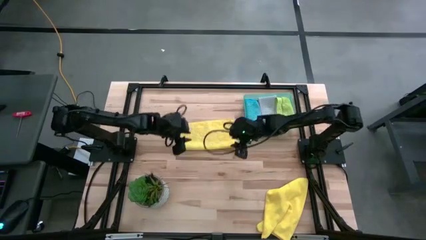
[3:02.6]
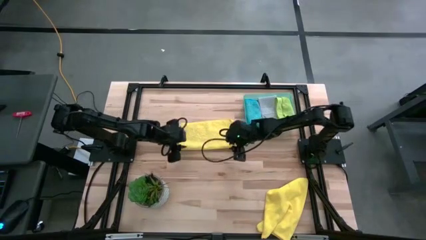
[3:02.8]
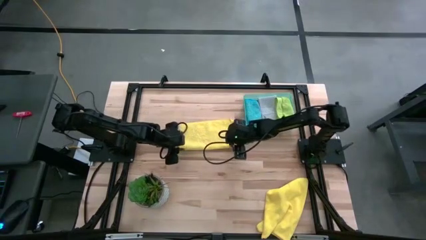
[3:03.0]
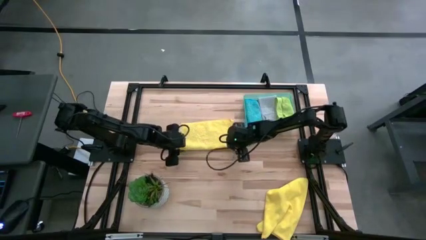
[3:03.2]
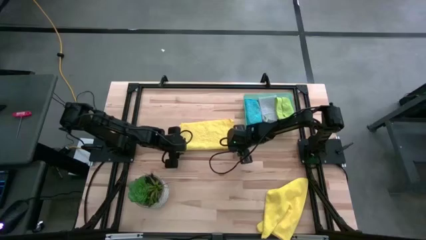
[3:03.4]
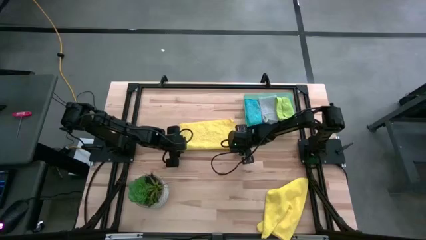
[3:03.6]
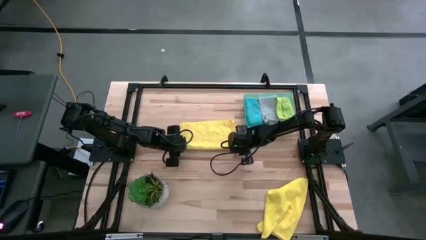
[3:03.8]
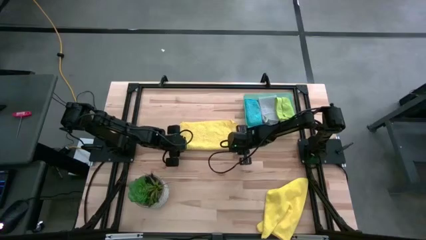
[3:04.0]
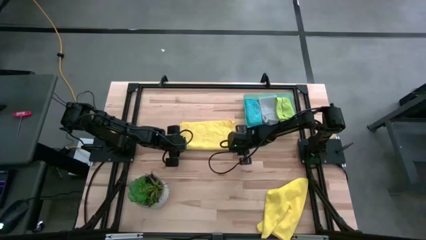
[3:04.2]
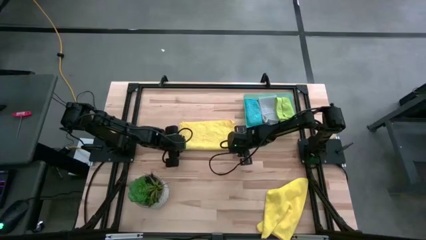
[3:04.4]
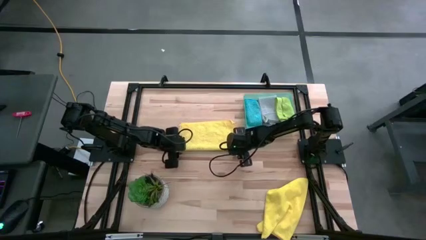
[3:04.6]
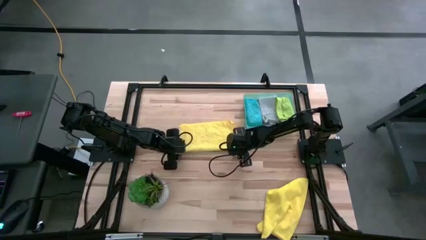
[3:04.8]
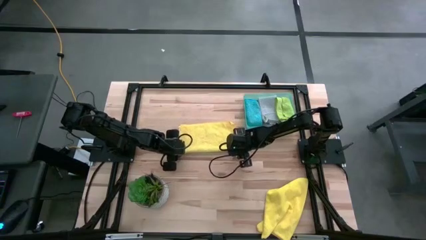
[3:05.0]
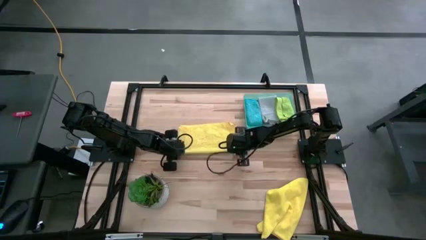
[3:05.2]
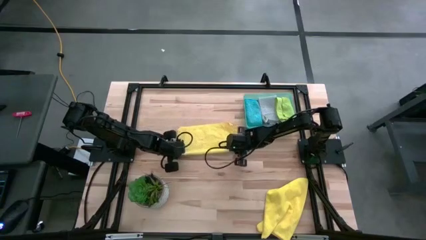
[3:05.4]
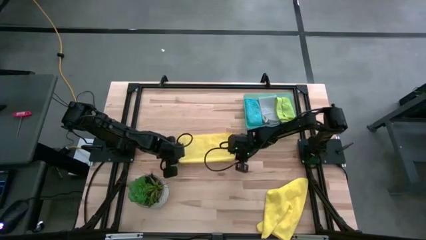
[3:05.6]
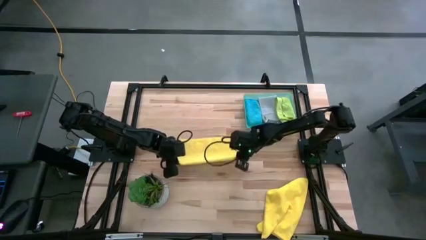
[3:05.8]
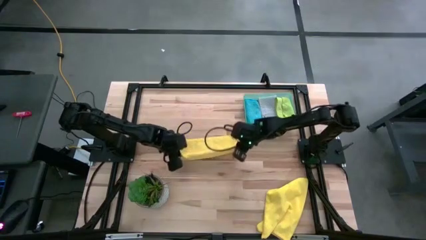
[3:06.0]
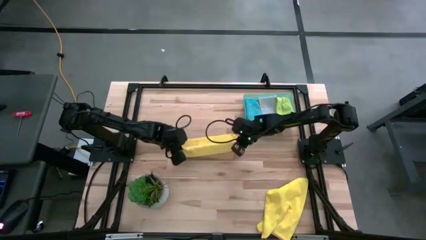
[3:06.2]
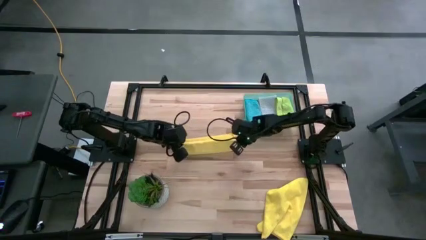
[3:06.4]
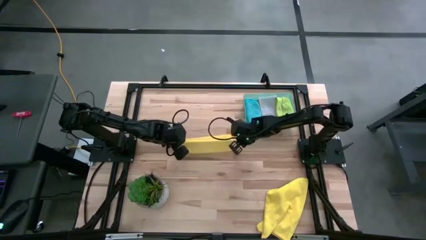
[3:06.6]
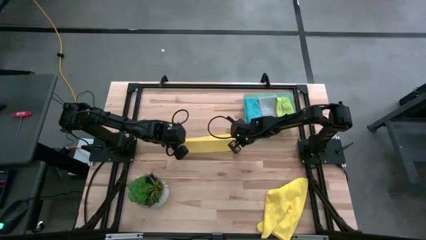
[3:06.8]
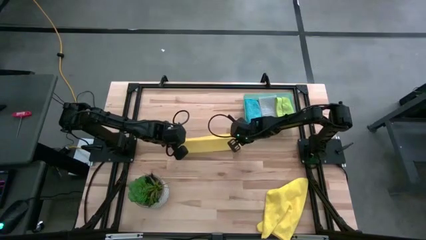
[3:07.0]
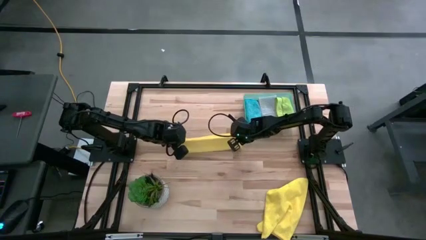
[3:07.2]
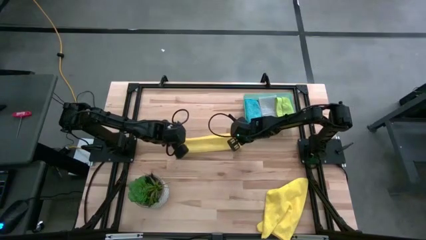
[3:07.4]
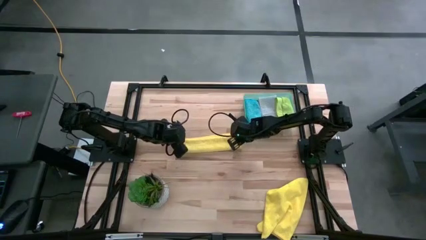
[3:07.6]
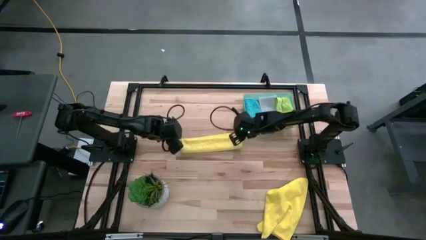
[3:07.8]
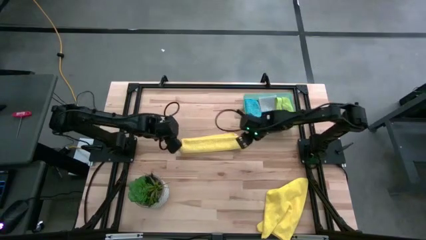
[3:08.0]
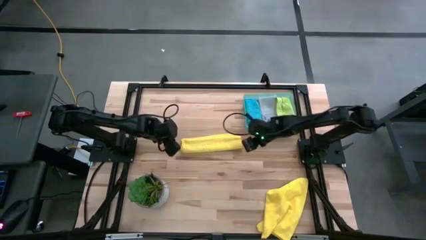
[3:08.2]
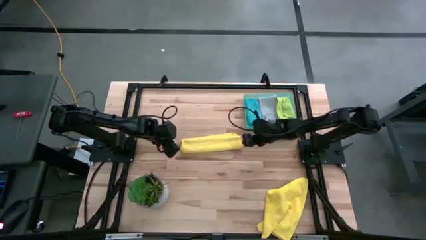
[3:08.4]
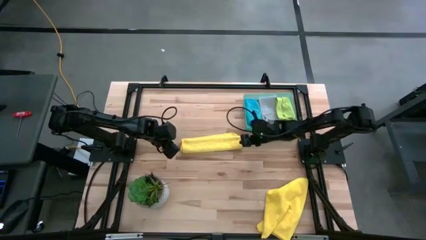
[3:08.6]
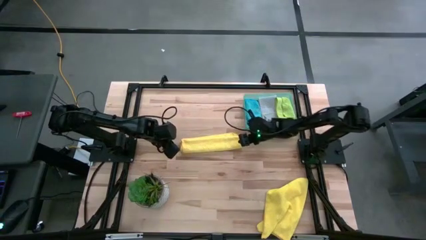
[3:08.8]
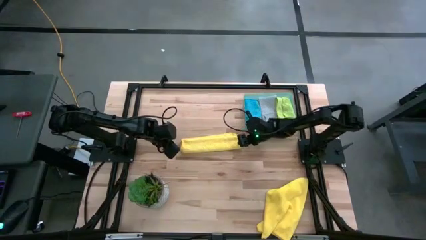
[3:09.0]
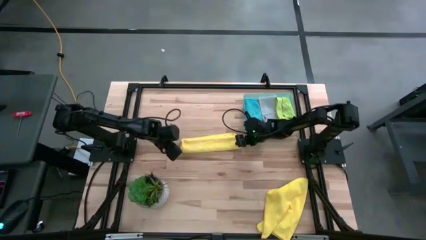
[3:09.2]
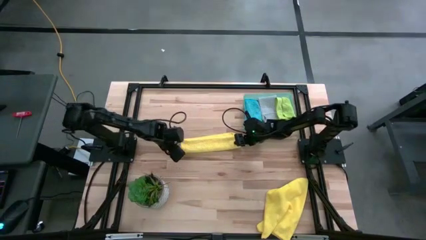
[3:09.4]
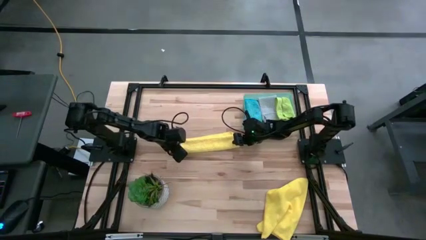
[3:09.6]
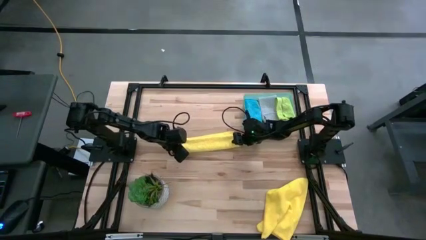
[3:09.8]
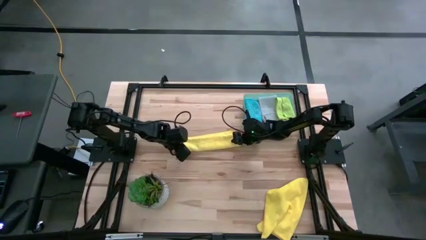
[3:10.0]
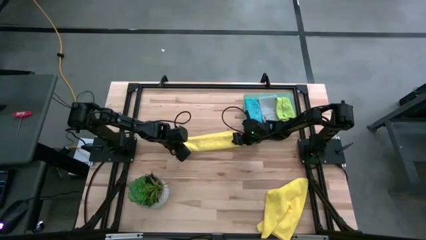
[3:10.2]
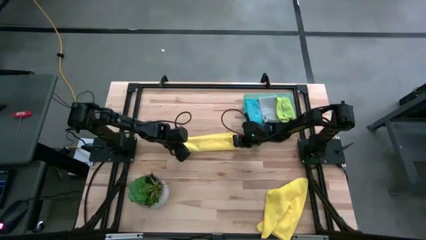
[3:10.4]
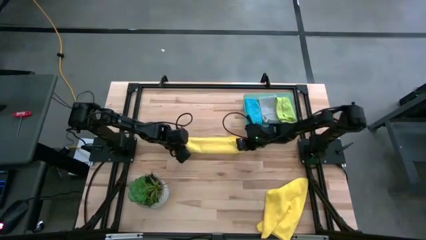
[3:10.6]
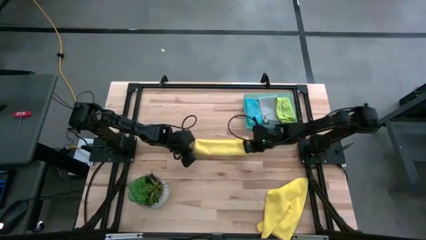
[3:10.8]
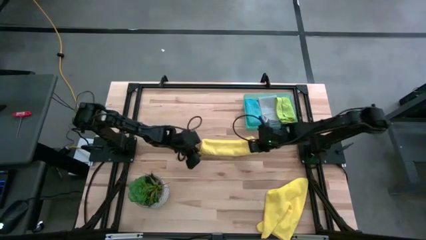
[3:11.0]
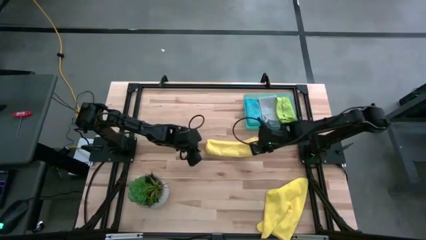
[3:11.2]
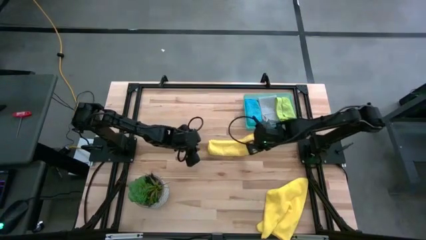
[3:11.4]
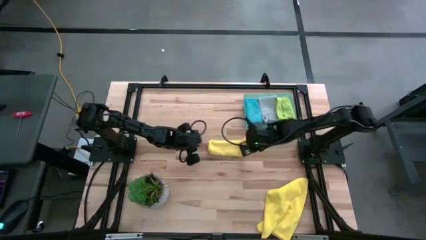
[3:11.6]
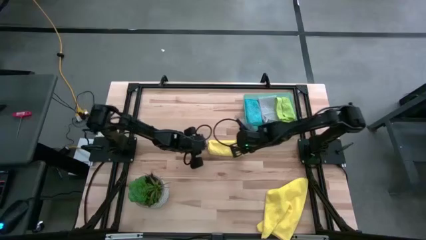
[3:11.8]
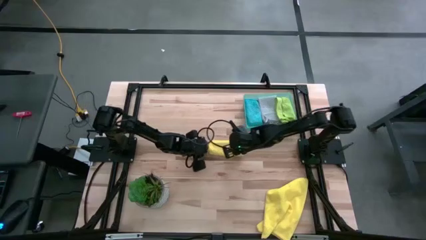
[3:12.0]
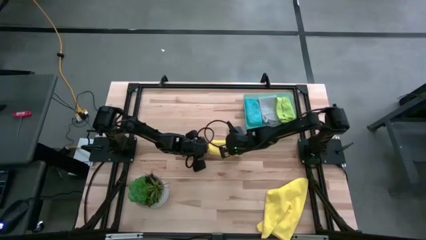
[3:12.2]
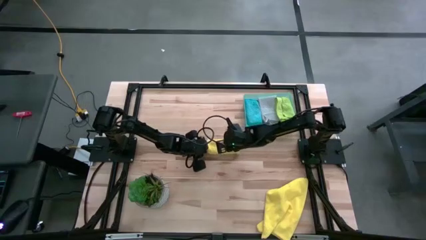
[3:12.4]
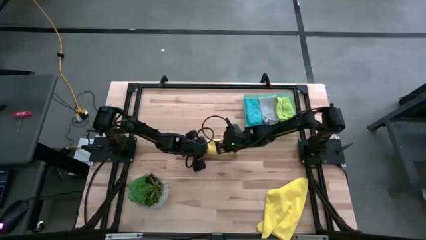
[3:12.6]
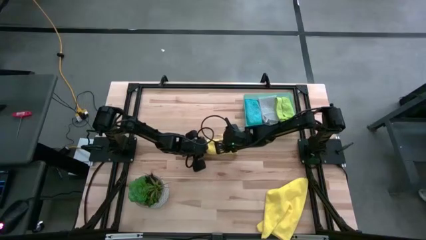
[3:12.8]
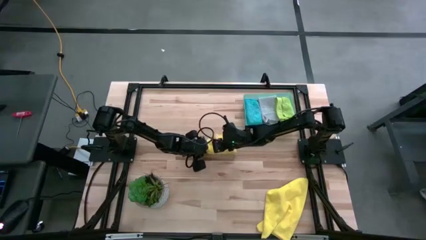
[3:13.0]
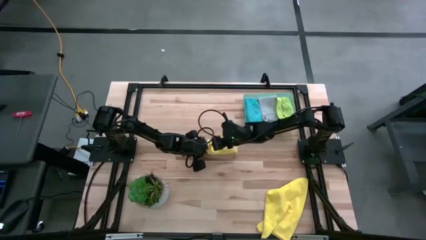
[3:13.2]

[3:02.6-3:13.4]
Task: Fold microfiber towels
Fold the left yellow towel

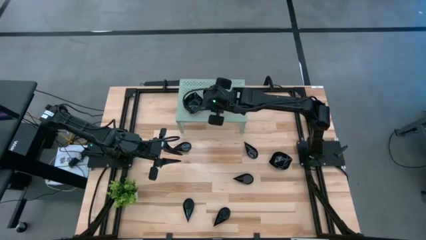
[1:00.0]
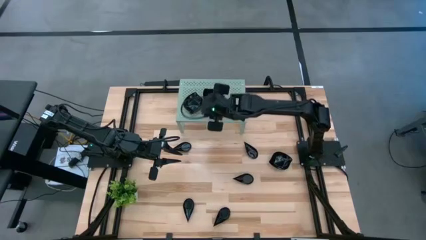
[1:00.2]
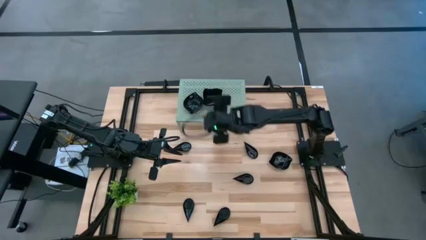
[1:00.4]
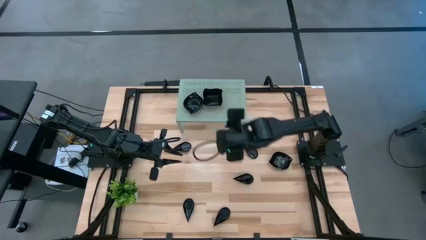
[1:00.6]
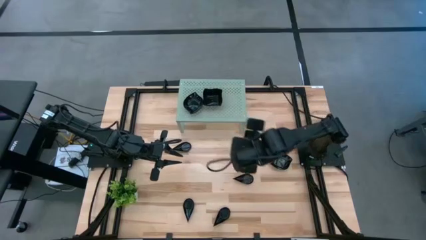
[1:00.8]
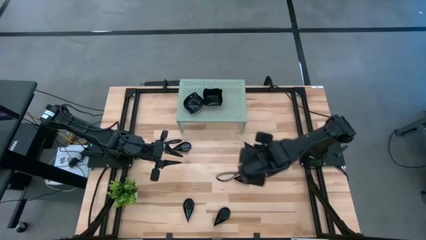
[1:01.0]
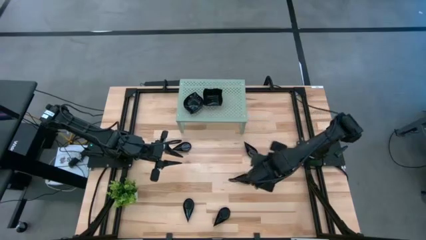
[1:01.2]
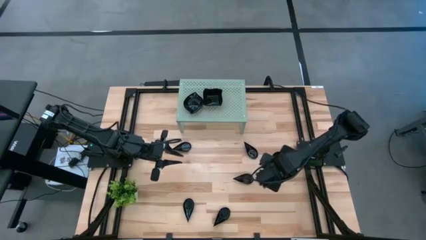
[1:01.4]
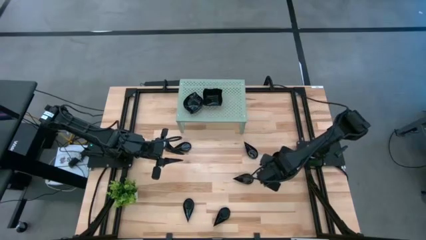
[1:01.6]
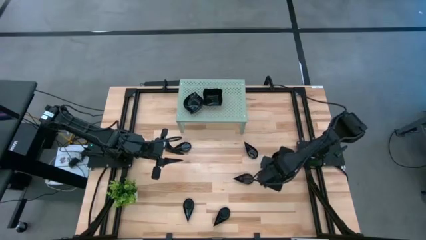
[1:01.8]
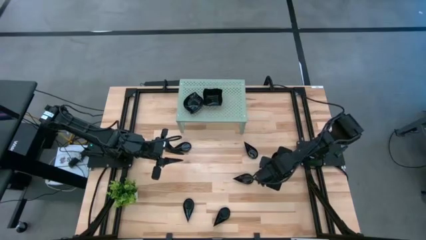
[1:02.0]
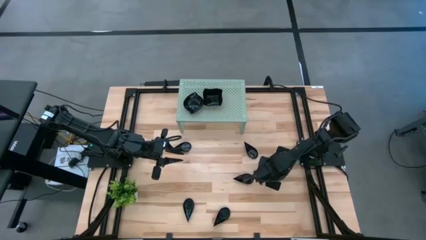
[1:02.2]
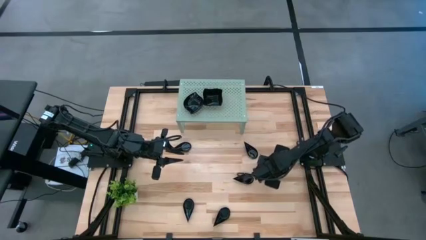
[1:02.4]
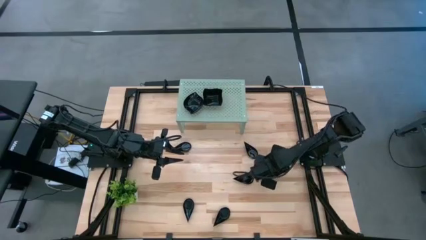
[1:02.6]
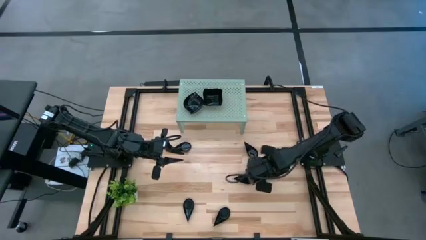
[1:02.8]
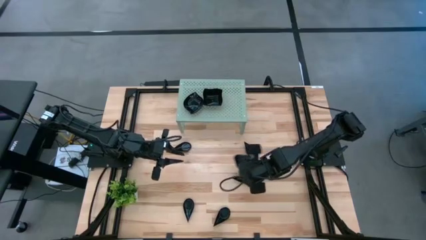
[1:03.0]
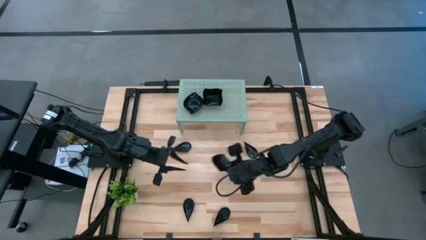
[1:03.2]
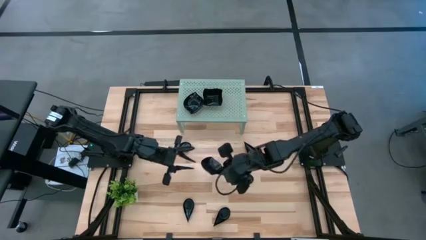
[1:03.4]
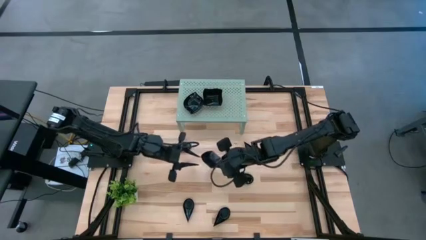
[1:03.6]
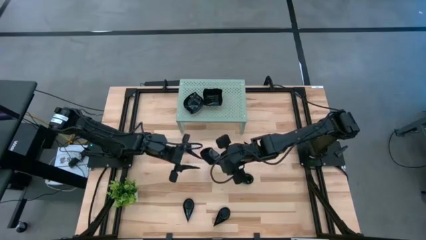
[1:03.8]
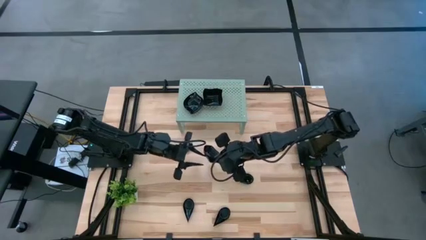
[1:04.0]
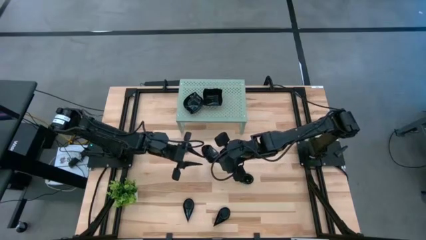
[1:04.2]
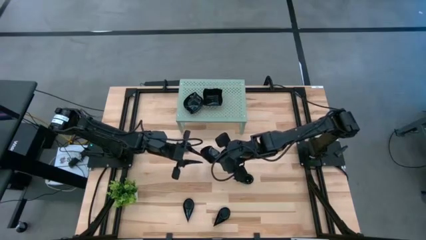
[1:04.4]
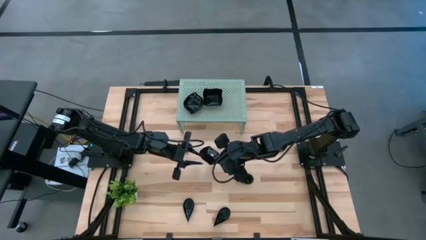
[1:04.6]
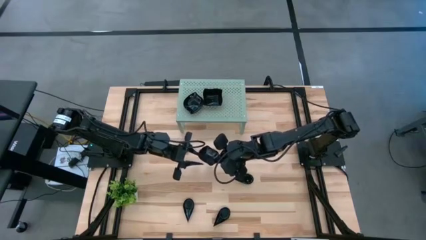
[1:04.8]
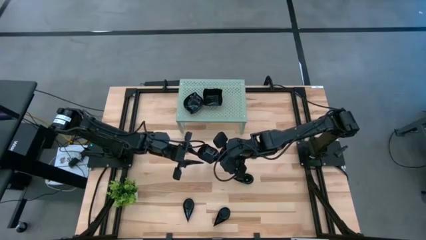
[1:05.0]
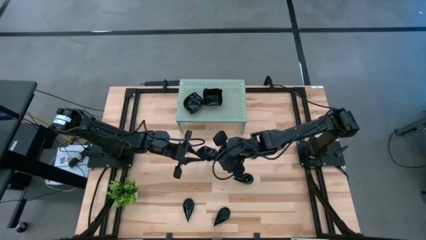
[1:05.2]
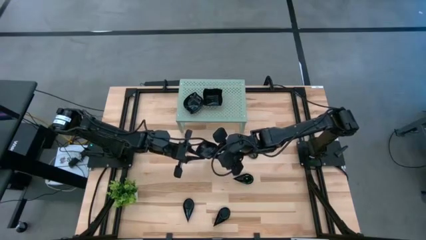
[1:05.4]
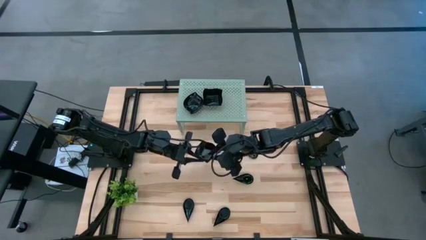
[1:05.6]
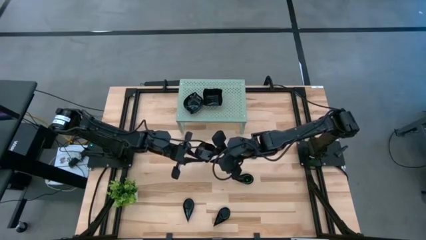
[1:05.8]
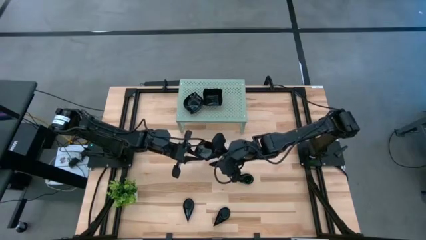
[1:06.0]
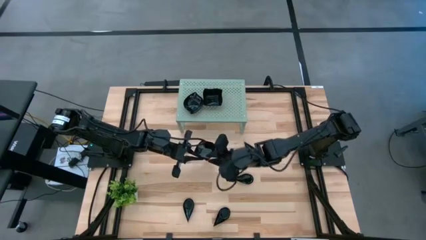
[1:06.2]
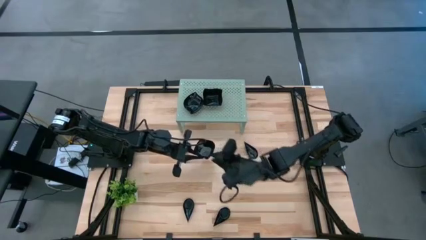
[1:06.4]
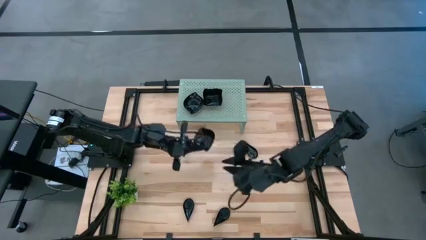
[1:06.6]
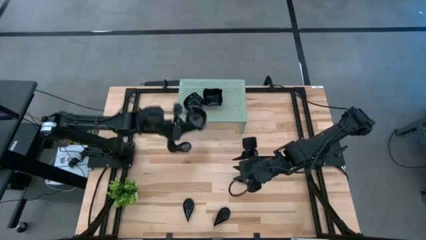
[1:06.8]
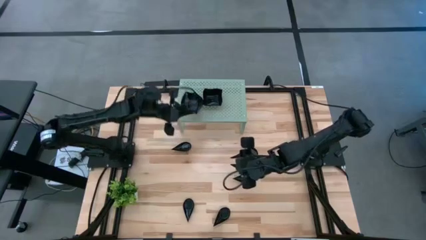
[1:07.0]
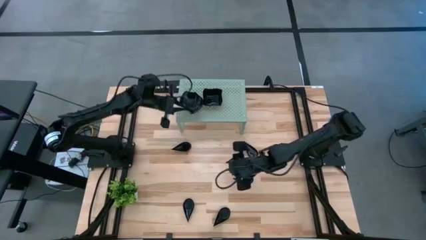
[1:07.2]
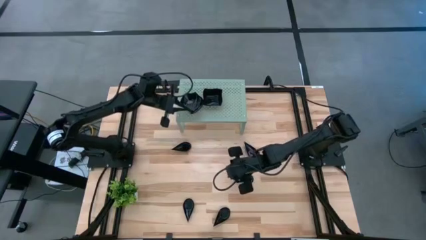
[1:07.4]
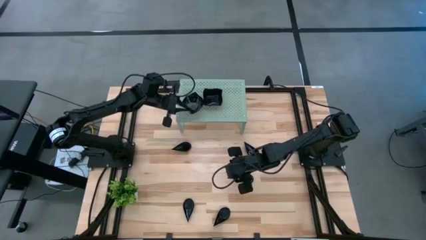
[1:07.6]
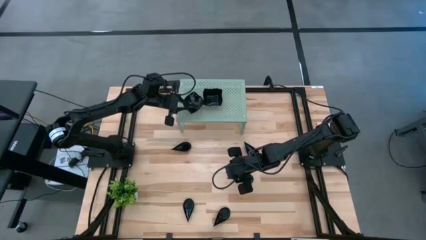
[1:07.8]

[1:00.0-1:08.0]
Task: Pick & Place Mini shaped plates
Stack the leaf-shaped plate on top of the other leaf-shaped plate on the shelf
